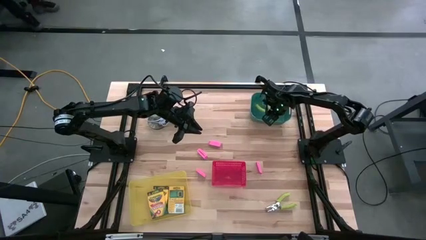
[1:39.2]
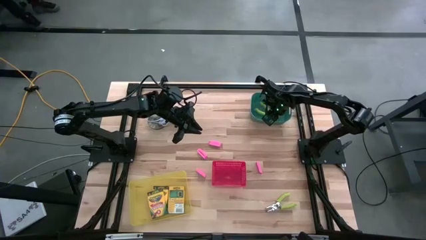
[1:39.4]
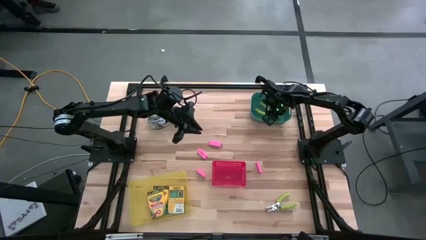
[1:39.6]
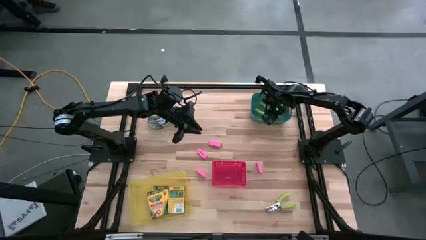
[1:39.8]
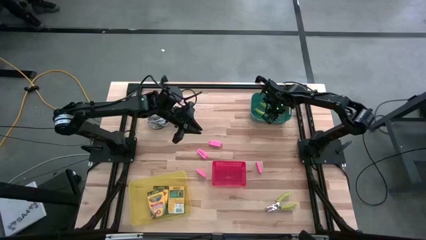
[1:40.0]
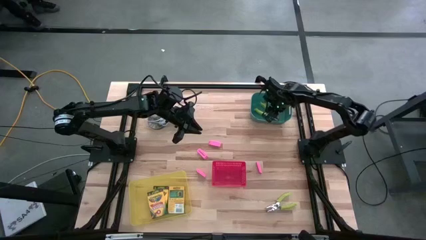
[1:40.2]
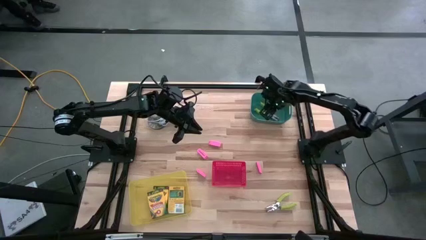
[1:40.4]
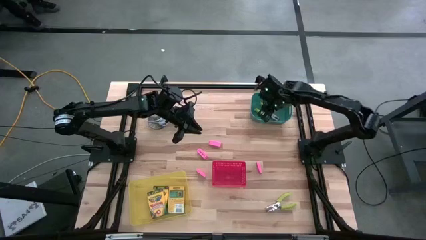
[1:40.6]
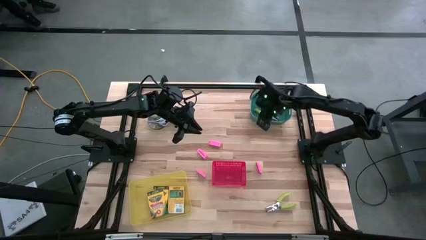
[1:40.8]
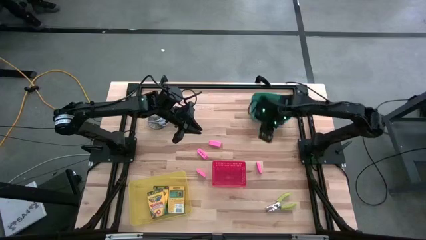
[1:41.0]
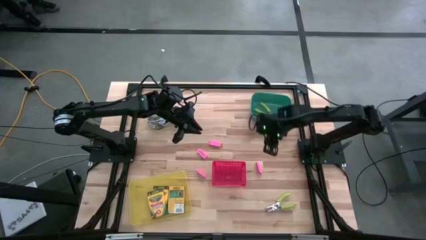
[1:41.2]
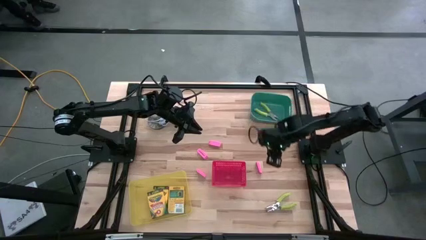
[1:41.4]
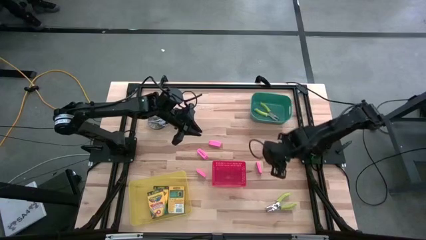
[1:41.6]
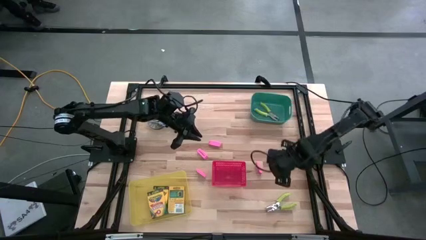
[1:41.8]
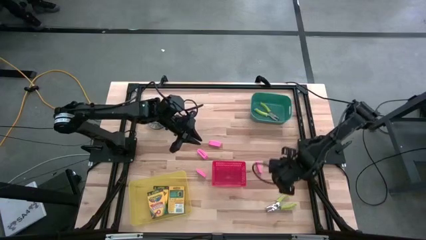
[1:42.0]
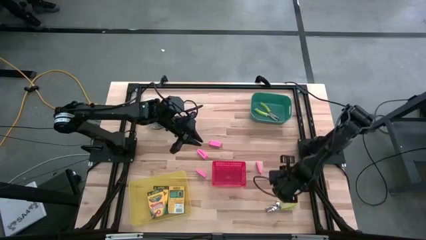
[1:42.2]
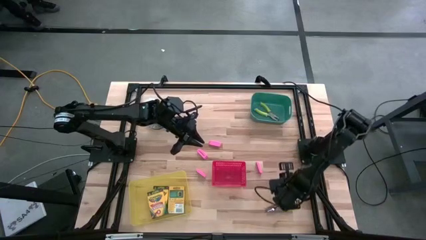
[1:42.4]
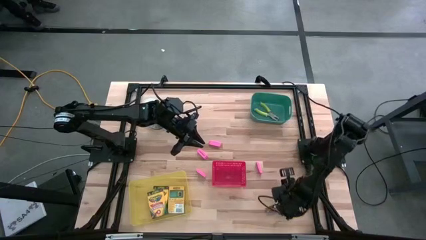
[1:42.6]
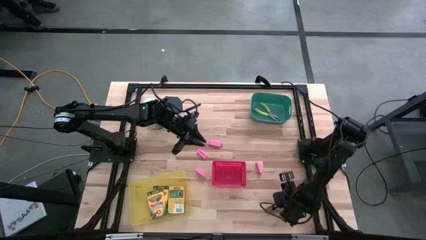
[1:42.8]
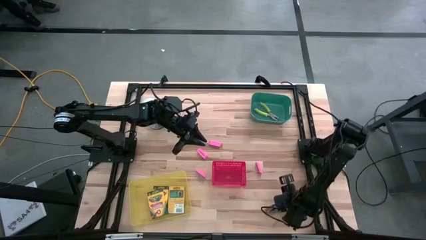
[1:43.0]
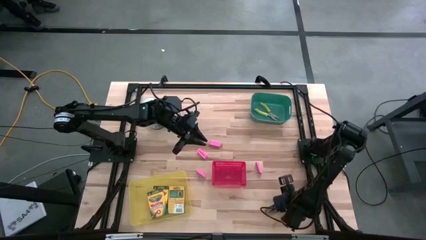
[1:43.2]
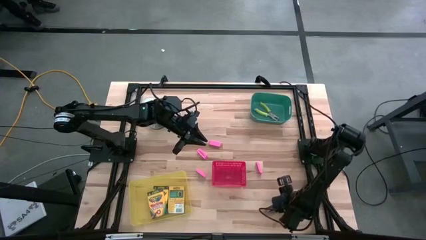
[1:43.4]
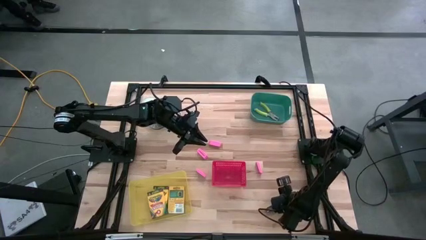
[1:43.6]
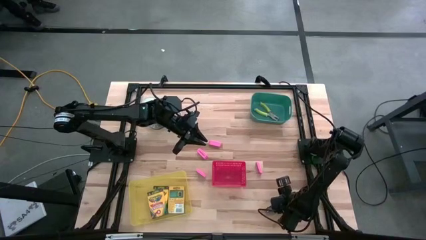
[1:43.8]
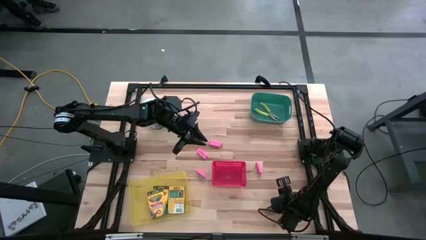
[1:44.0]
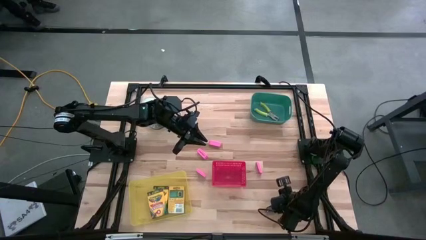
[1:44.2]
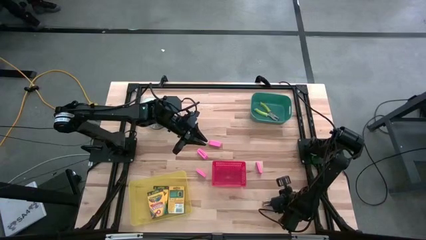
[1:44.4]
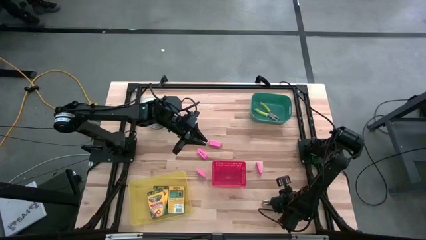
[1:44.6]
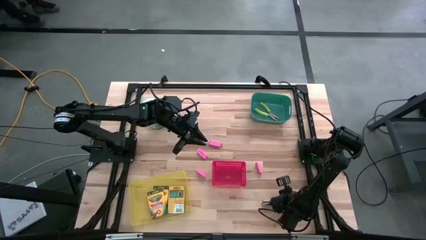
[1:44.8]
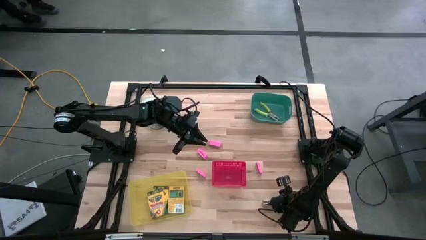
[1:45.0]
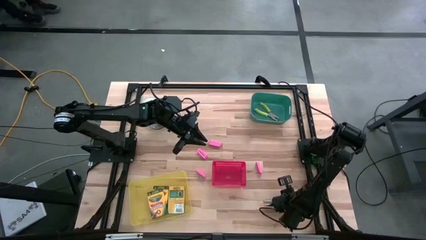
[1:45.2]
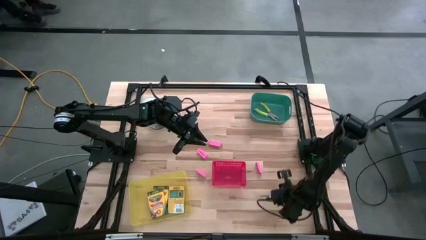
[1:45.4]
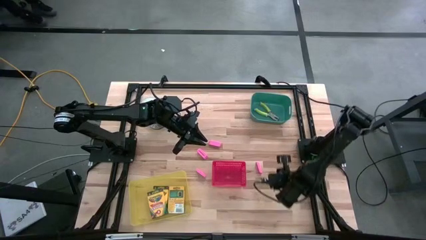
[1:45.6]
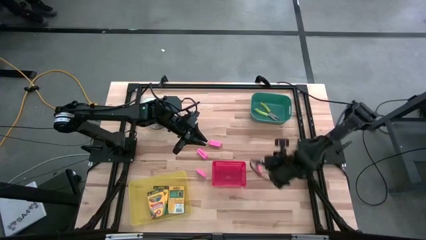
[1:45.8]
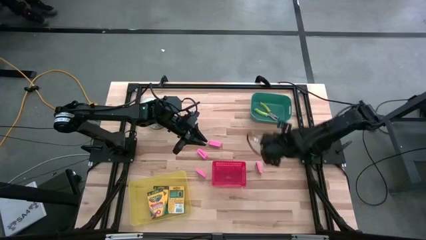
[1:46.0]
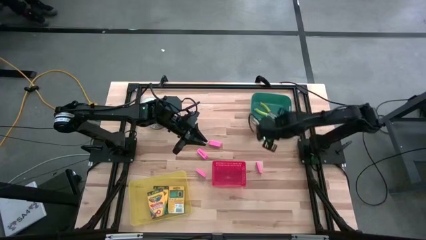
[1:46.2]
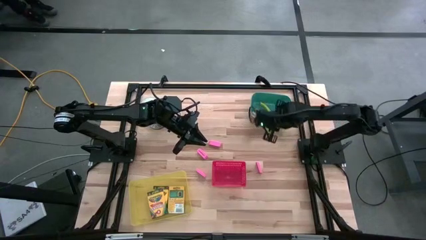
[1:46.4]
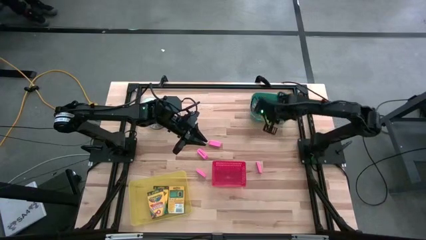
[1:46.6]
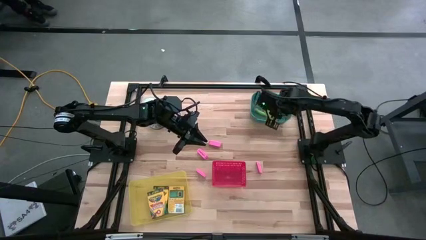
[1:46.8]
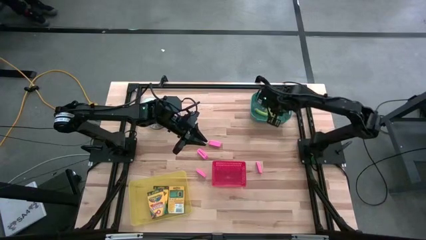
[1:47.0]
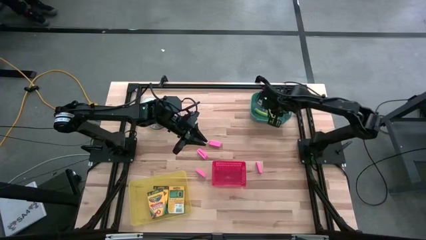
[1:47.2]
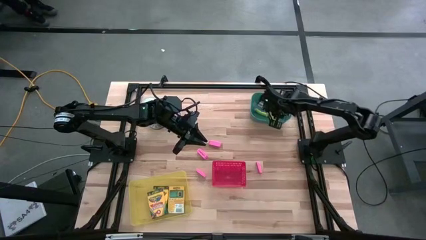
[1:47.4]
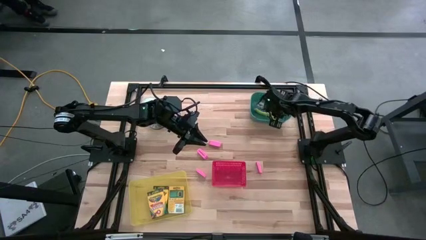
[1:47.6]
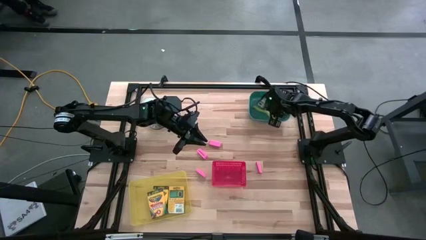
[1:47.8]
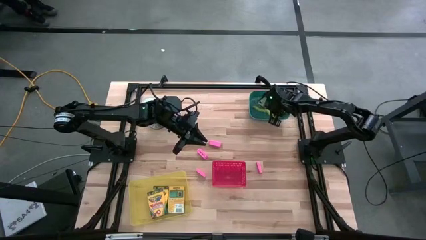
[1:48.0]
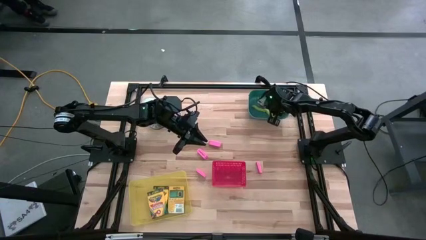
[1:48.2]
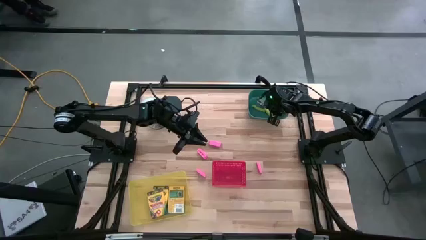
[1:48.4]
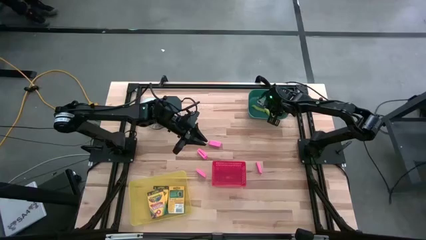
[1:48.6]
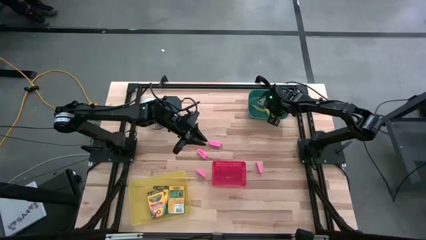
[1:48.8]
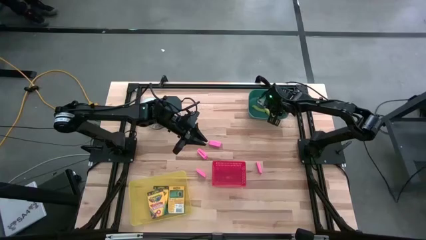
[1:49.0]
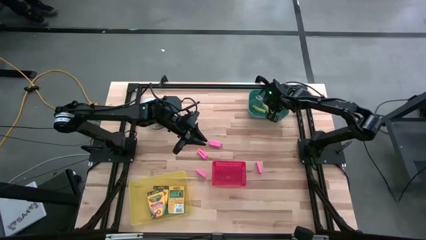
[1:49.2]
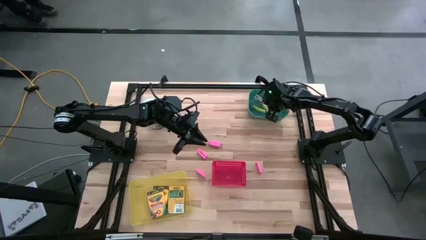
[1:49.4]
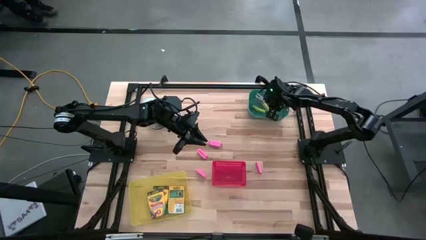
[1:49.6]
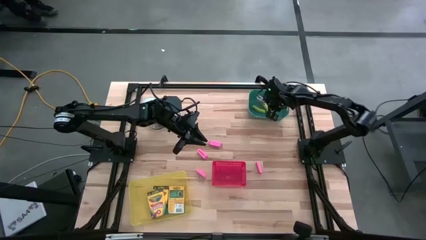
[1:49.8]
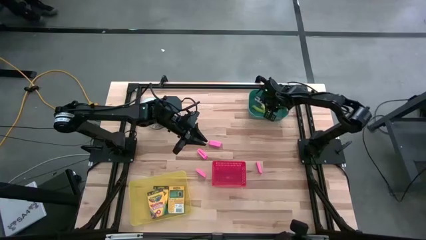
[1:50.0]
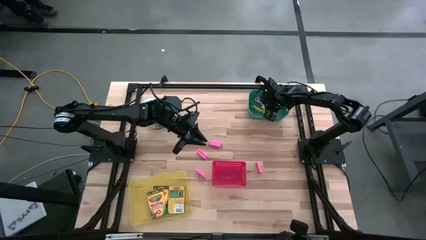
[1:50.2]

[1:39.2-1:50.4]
Task: Pick & Place School Supplies
Put the bright green hole punch into the green bin

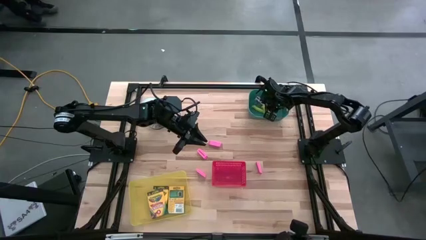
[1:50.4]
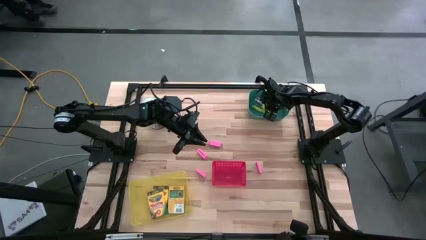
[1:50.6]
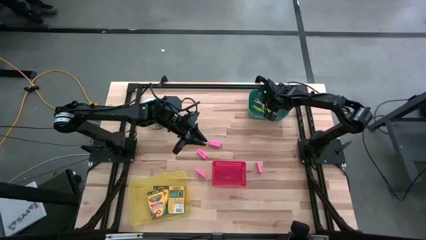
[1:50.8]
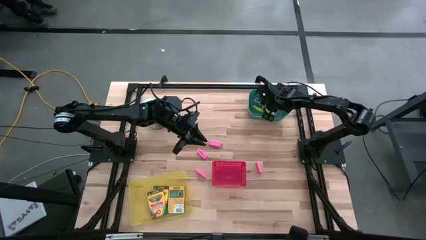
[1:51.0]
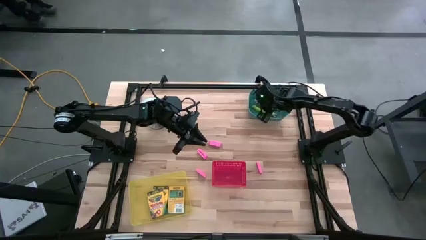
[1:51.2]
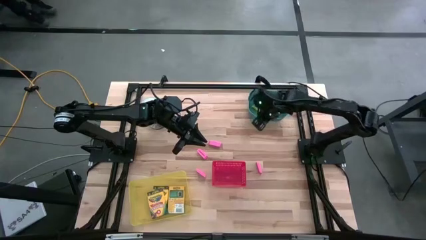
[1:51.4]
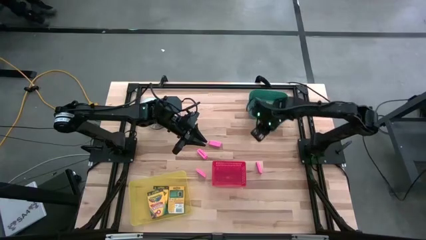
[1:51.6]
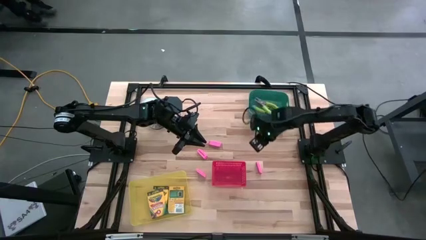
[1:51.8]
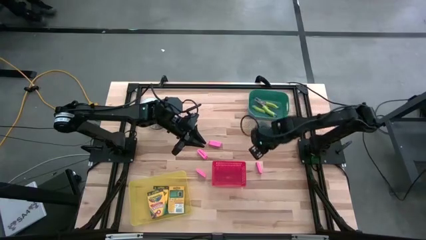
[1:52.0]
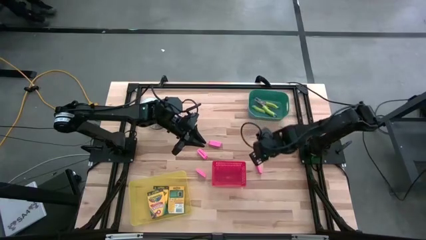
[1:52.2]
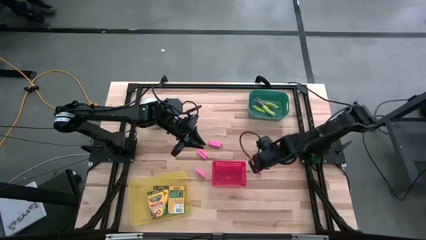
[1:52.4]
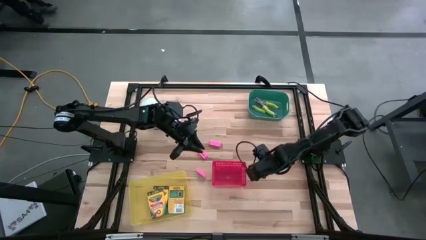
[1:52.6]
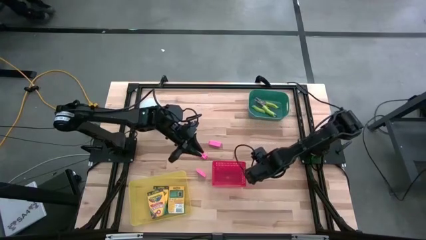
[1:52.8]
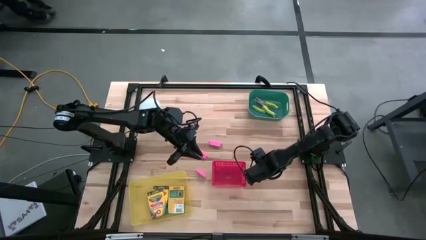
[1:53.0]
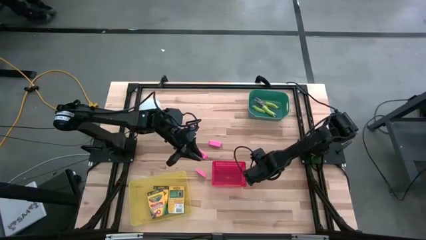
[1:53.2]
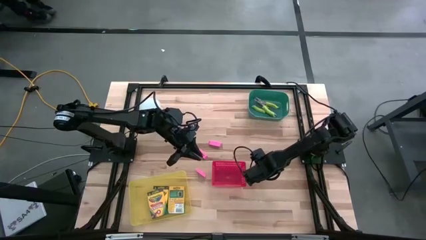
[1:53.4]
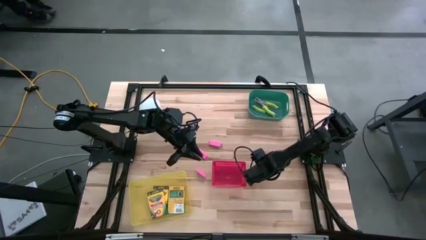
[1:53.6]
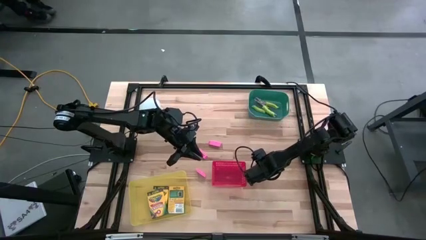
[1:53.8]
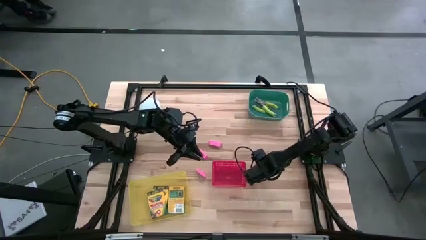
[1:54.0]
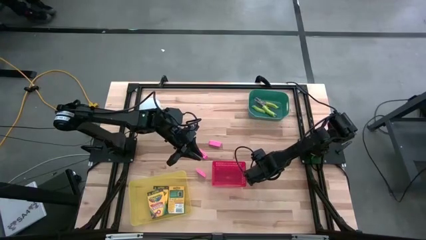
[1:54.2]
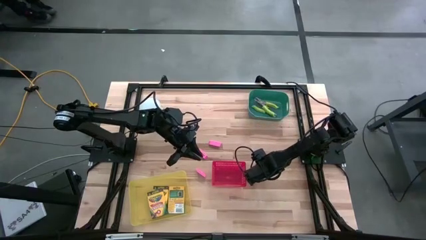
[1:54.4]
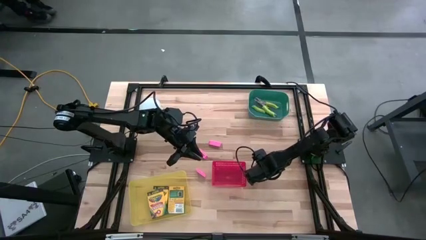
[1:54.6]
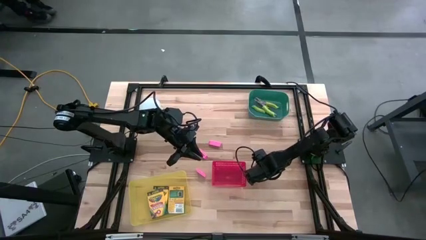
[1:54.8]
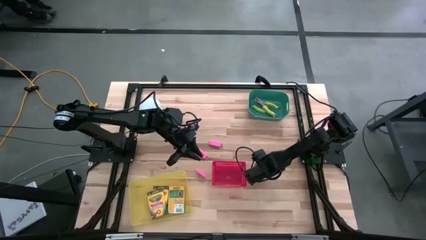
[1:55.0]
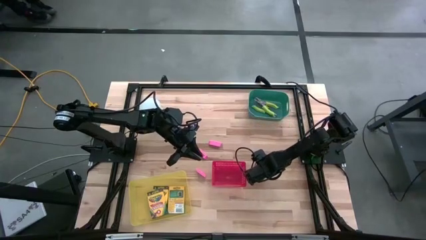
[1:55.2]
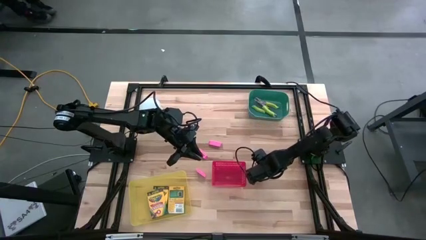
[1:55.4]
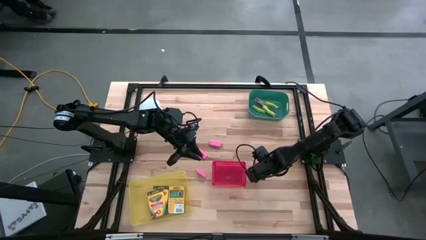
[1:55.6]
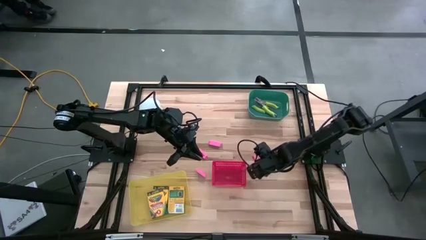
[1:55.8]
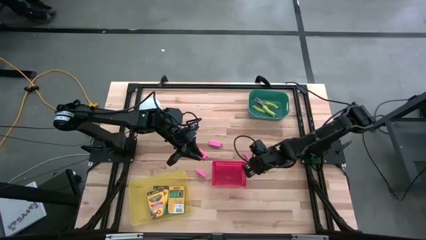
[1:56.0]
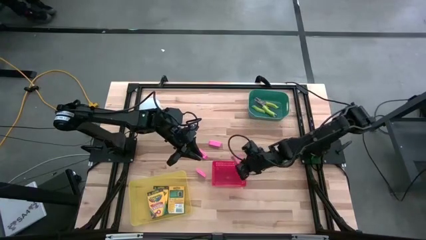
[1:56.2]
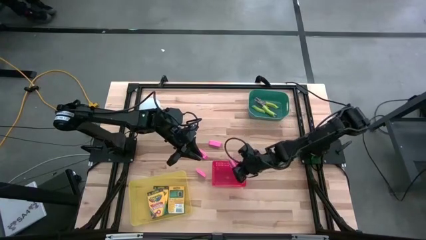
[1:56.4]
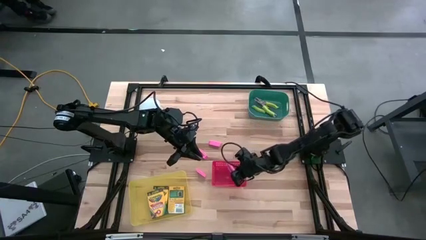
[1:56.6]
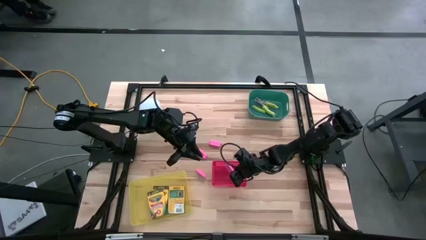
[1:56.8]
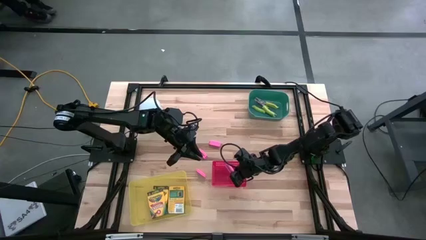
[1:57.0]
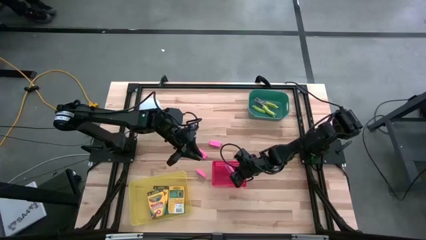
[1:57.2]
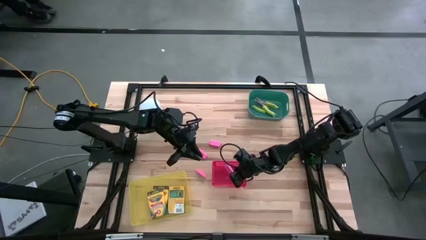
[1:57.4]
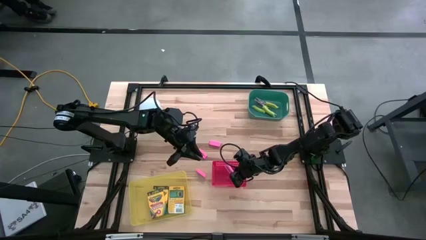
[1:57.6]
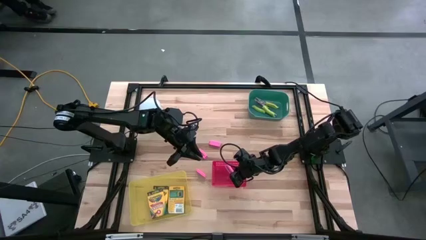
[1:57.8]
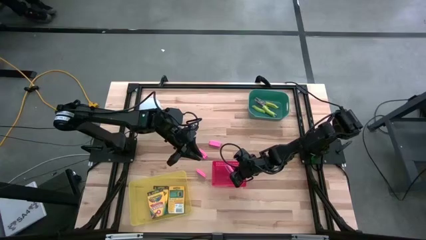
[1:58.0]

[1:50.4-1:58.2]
Put the pink eraser into the red bin
